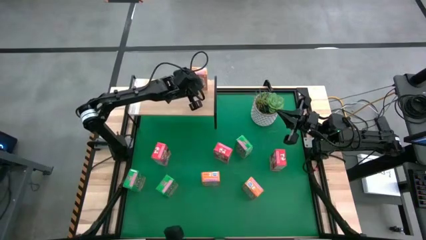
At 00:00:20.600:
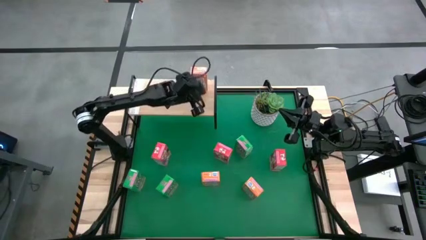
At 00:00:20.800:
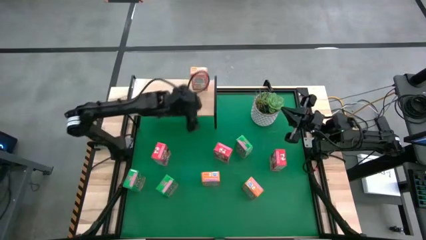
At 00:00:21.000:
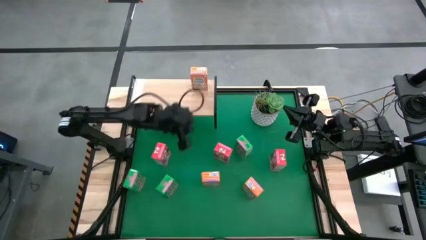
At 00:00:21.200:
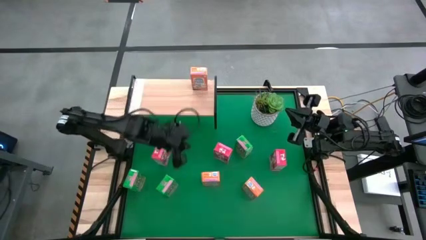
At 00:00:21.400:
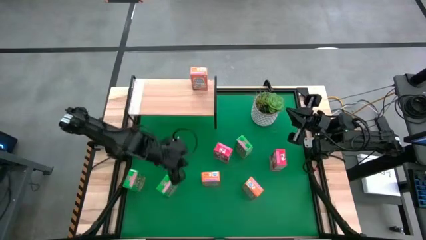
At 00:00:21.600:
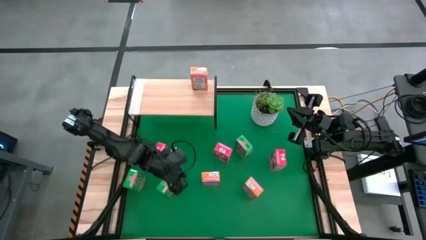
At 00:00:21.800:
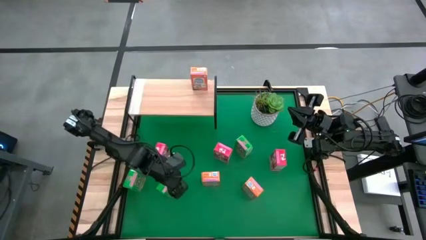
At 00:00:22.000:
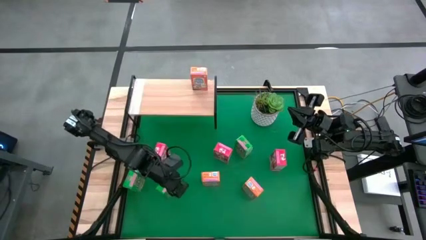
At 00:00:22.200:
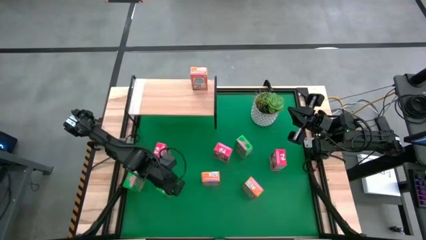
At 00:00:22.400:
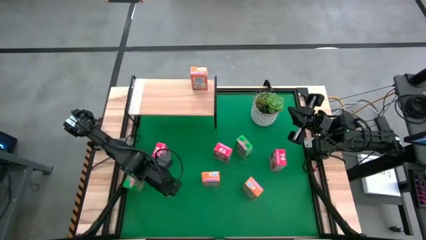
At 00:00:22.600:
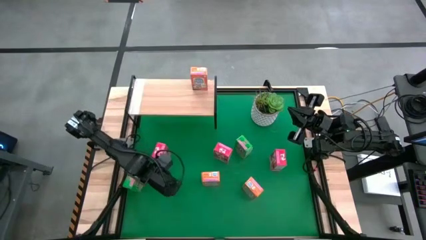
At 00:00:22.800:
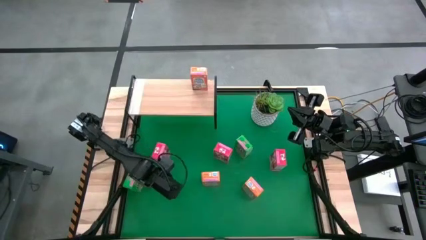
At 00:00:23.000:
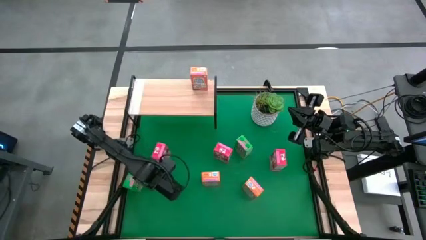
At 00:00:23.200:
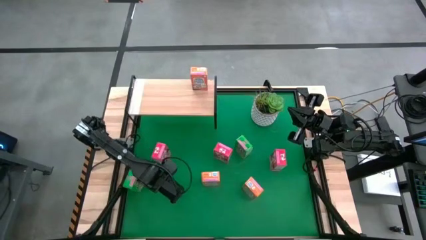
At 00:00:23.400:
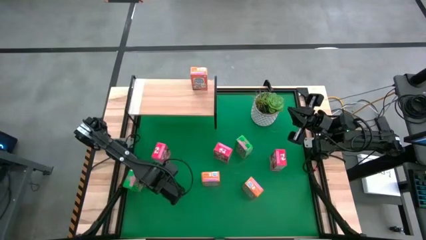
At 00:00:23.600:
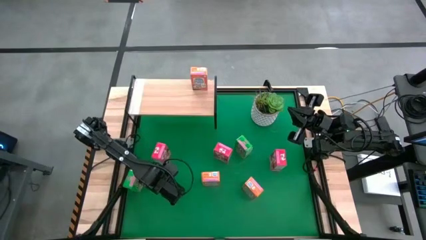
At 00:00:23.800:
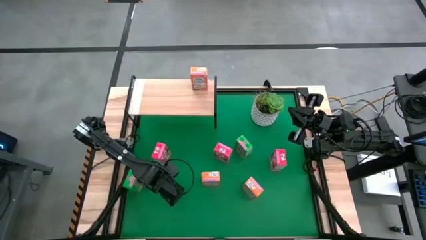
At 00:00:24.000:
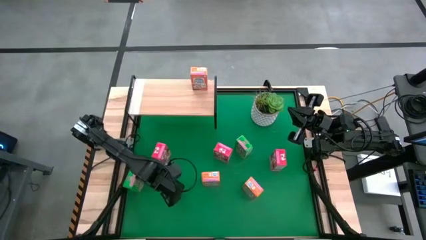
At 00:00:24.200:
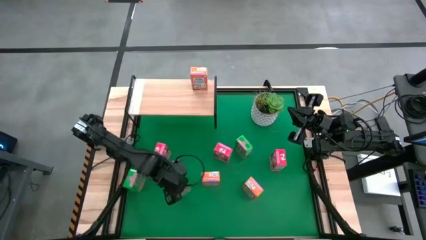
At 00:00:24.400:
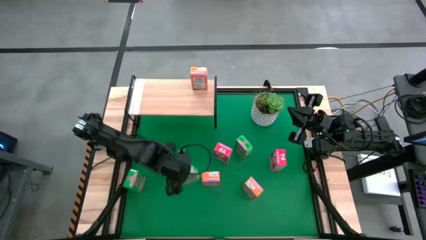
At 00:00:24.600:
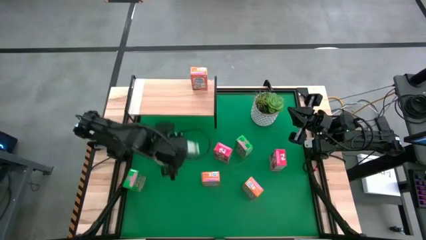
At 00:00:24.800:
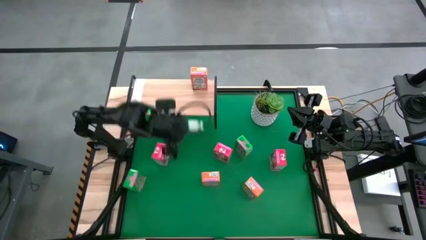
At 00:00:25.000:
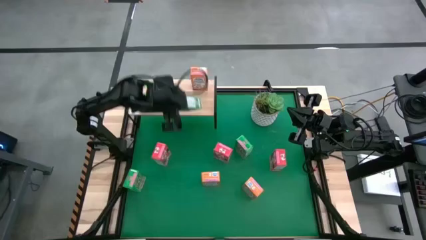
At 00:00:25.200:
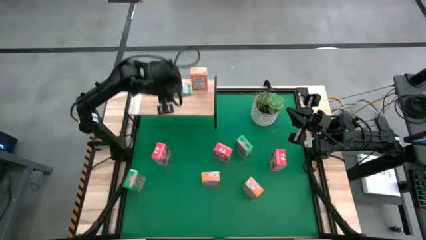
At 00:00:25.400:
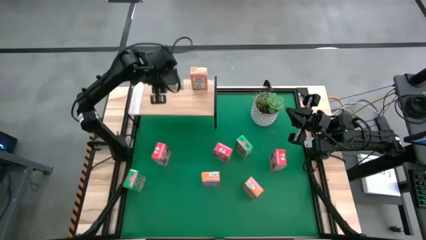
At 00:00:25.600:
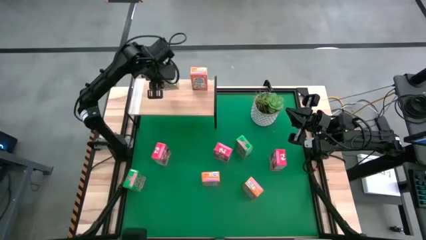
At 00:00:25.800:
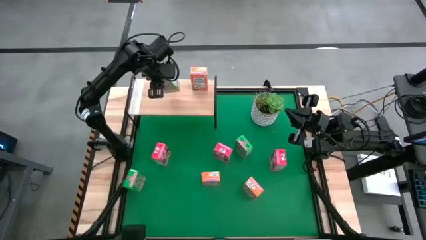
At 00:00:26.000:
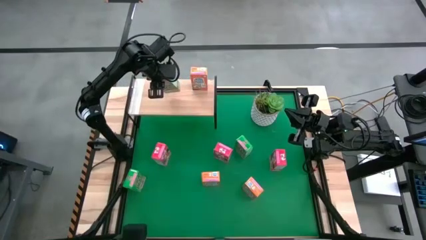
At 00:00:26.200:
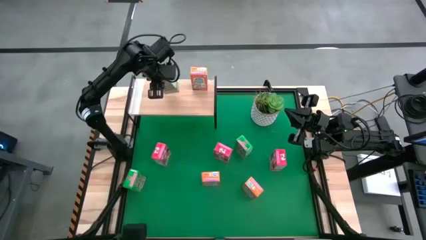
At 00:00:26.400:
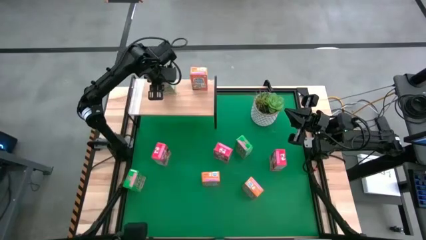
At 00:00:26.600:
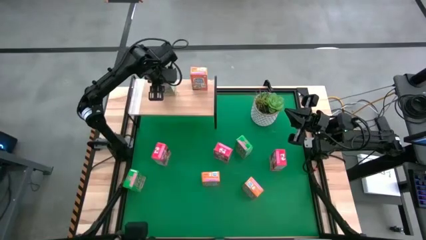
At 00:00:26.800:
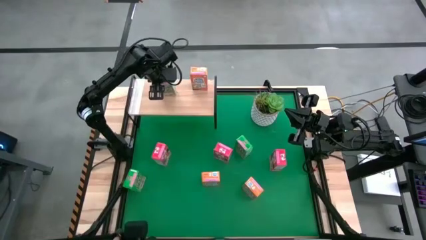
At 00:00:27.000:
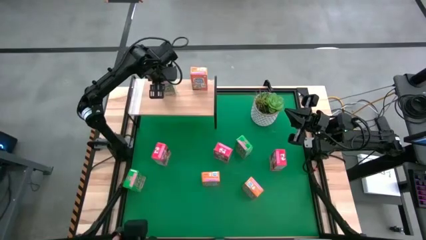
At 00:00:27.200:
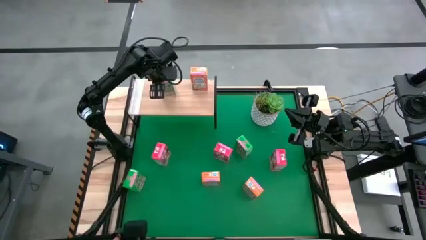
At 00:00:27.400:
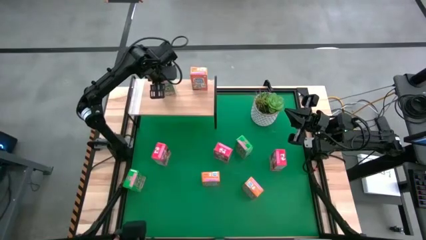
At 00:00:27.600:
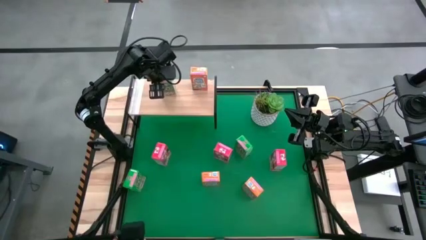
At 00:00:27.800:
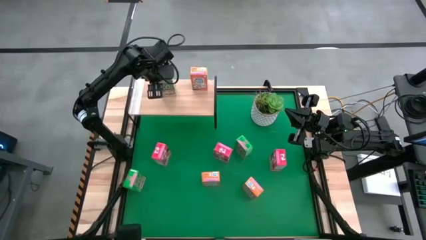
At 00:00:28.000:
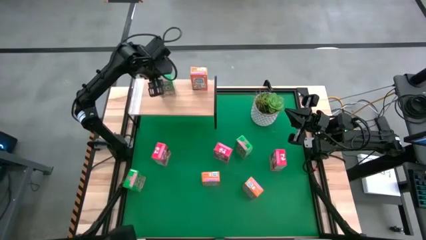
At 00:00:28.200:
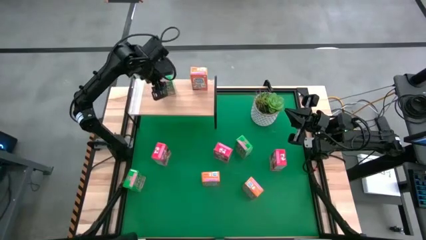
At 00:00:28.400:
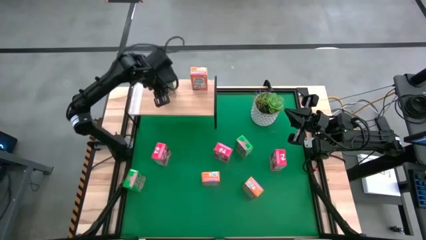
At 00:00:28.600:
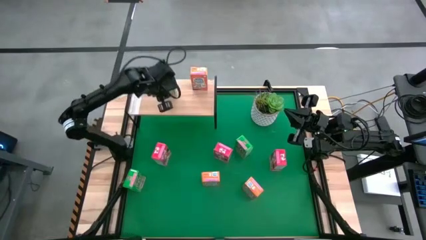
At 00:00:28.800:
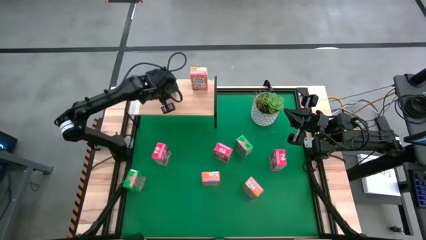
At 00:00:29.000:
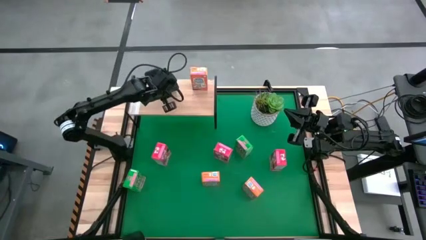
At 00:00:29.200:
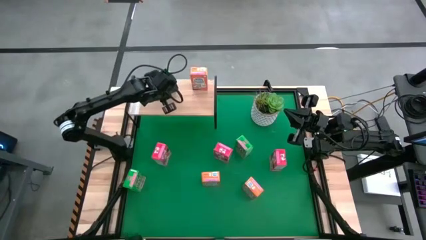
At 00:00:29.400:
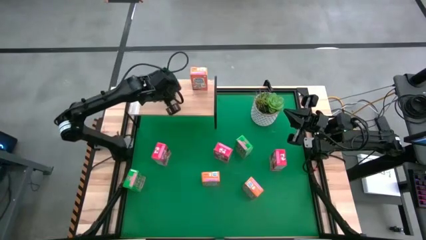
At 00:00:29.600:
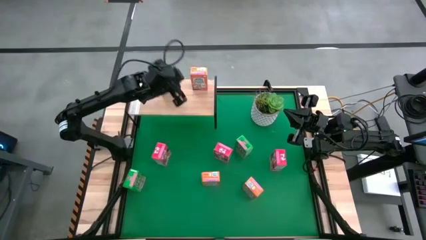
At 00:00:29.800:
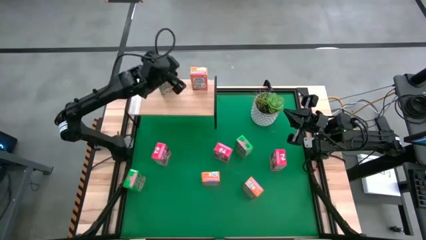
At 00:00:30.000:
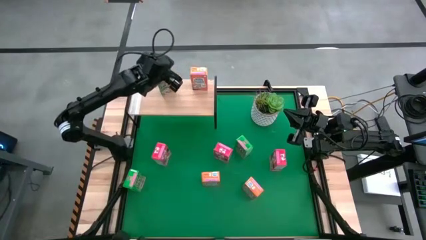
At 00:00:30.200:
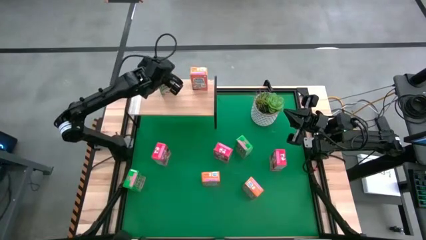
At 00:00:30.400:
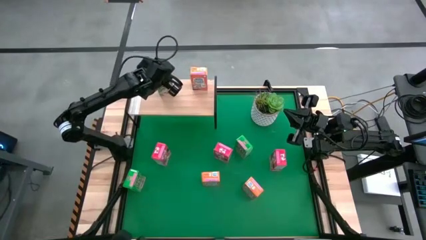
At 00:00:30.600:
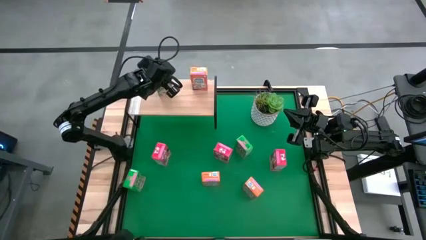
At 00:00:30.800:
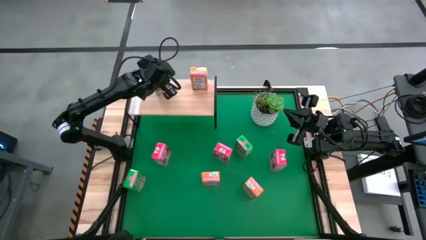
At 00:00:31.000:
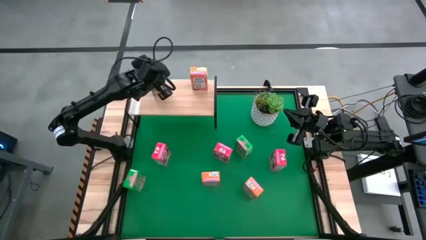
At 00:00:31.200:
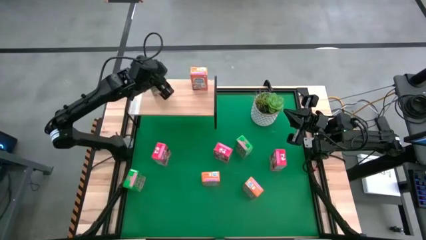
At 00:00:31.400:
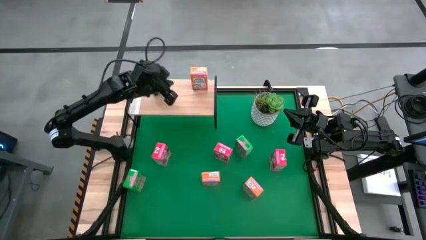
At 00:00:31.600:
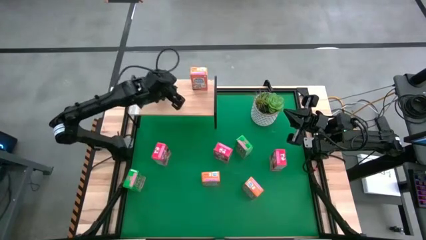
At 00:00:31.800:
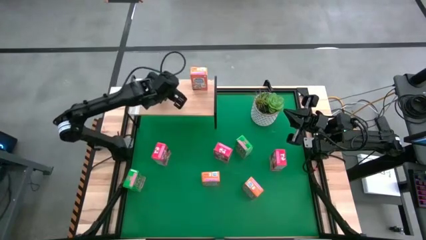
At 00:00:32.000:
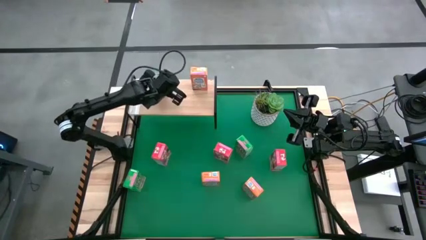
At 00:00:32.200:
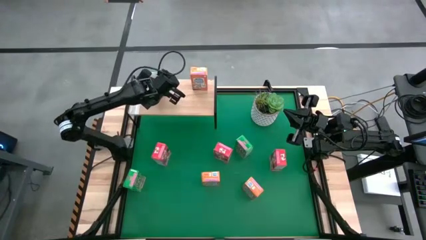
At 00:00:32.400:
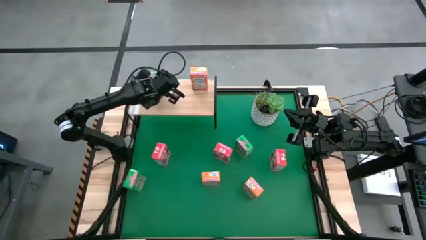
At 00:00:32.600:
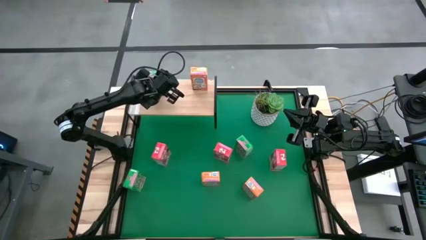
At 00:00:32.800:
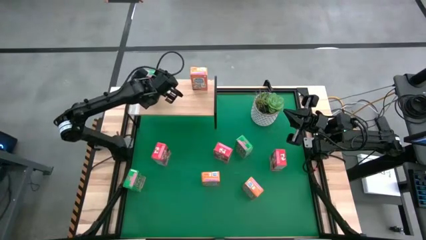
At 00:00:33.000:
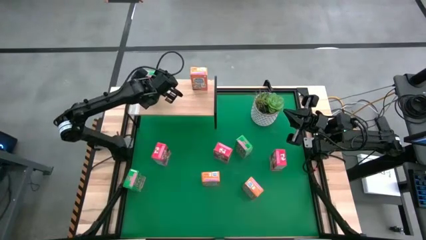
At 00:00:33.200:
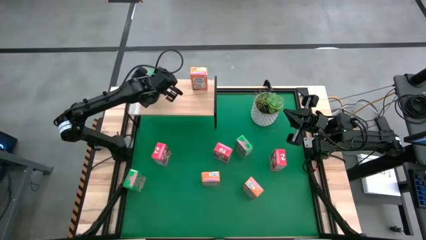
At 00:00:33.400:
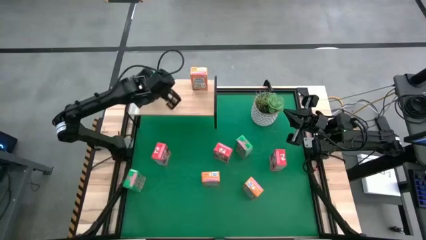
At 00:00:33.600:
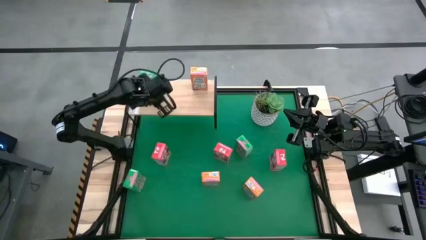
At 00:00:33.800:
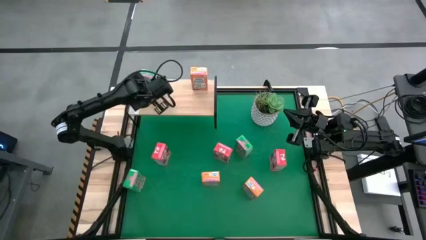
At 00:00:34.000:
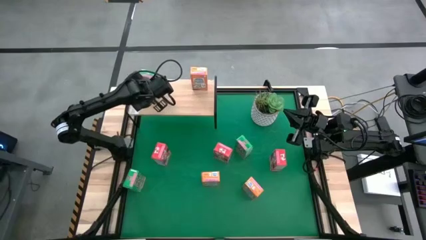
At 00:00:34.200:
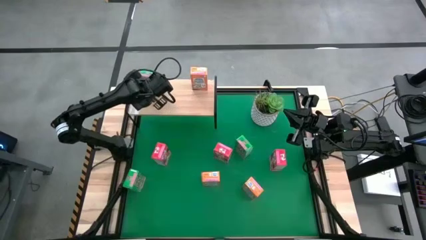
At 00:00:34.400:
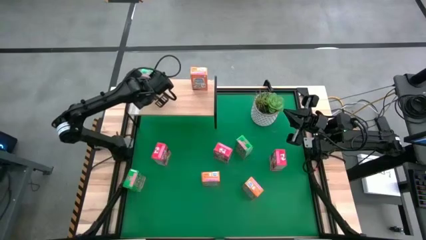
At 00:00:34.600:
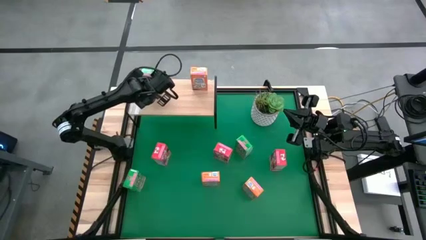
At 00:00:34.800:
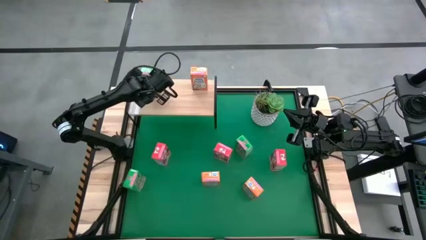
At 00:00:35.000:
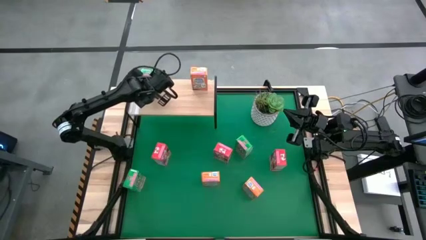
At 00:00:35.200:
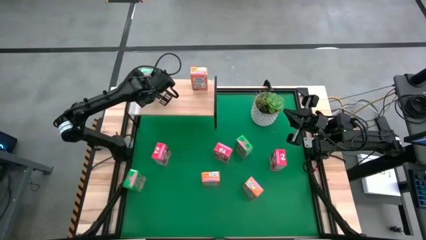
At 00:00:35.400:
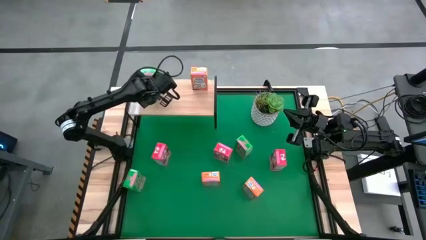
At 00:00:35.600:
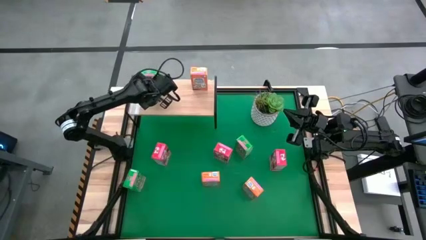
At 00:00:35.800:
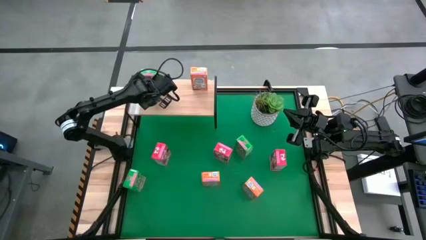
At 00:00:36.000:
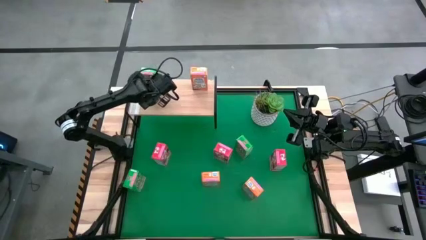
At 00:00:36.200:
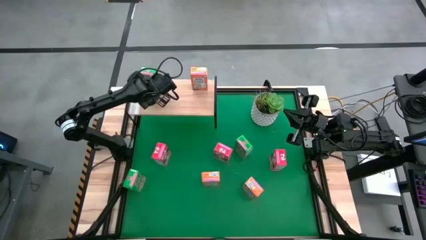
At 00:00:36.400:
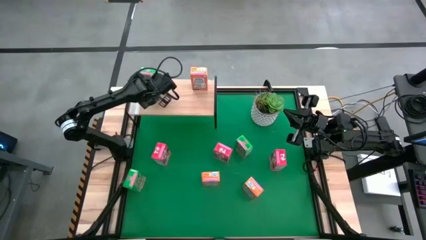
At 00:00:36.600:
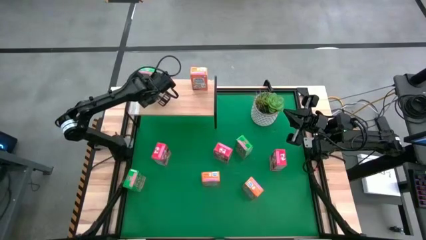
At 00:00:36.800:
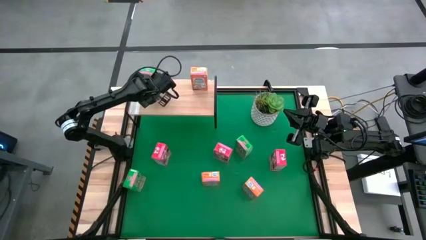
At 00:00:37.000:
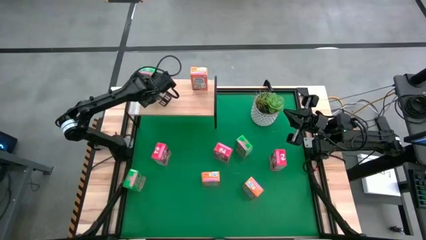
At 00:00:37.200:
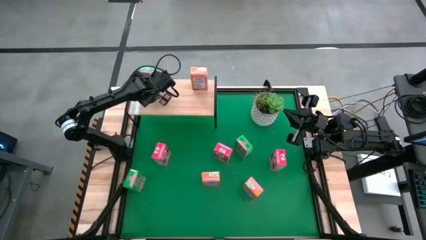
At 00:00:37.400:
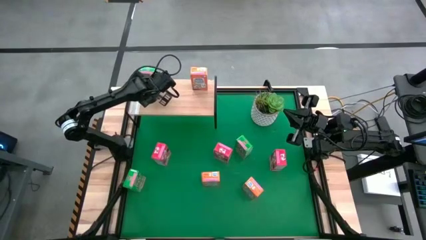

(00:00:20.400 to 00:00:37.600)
Task: Stack cereal on shelf
Put the bottom right green cereal box on the shelf
